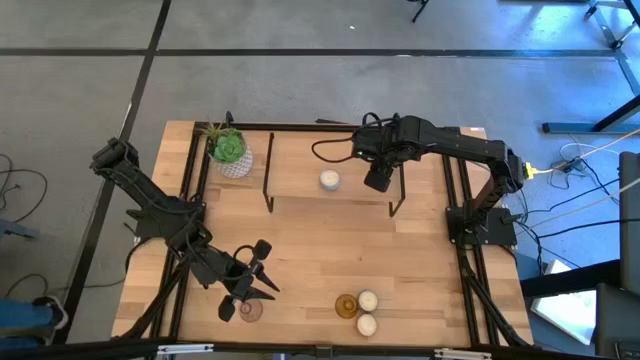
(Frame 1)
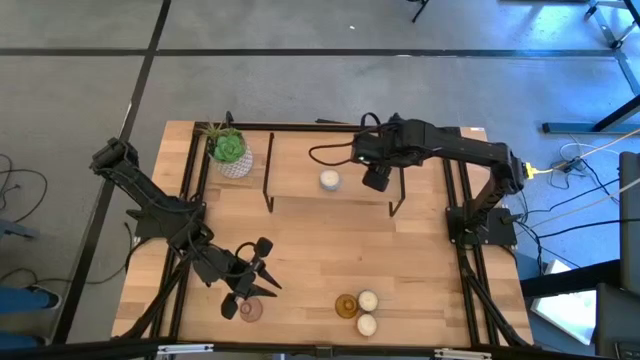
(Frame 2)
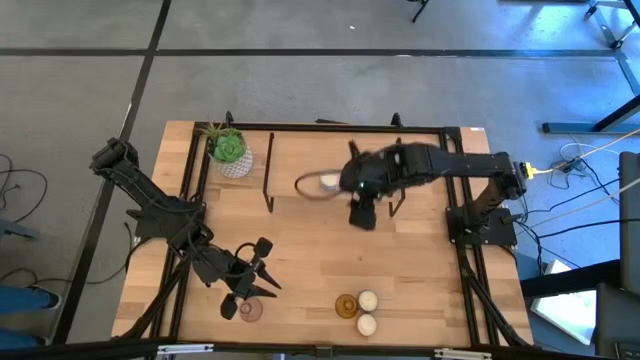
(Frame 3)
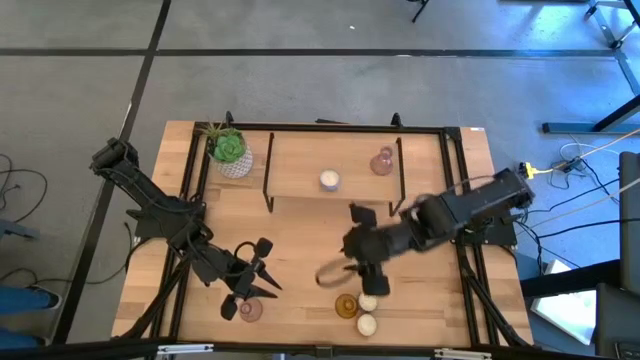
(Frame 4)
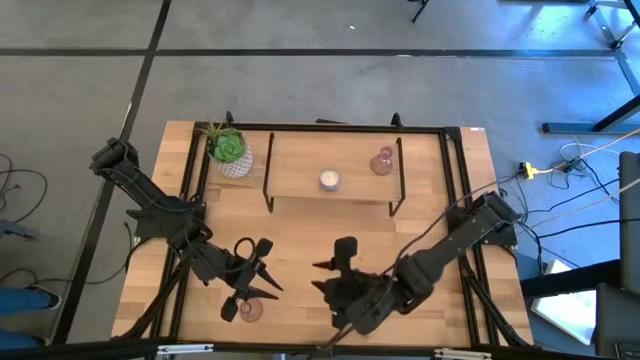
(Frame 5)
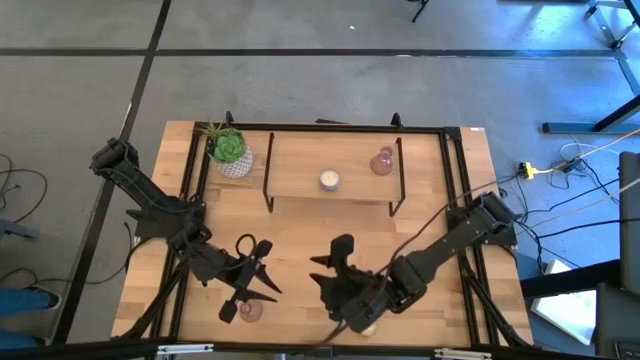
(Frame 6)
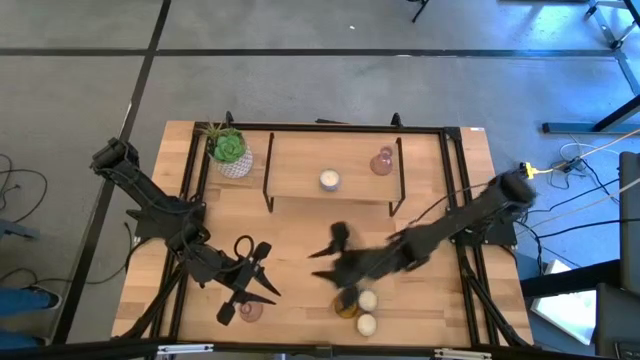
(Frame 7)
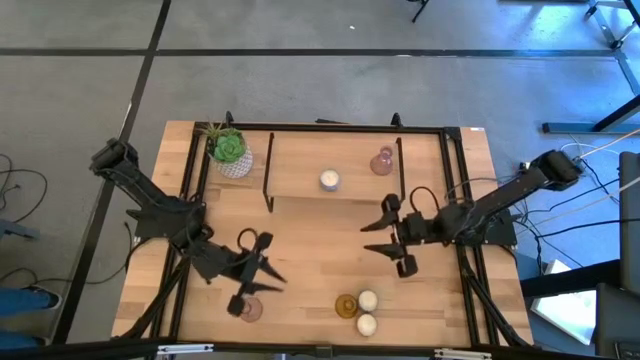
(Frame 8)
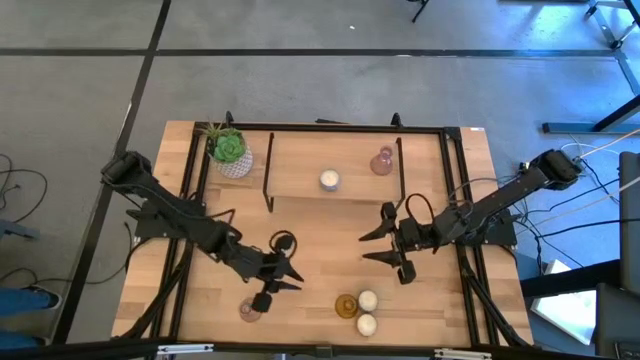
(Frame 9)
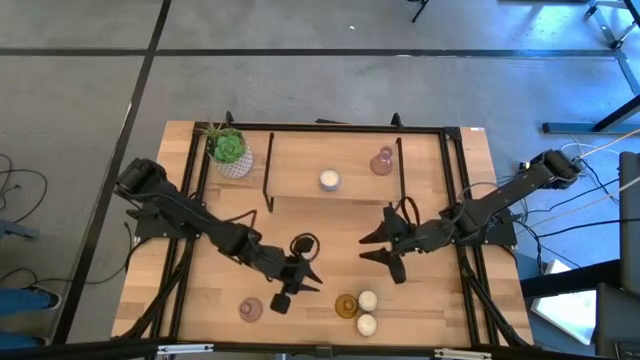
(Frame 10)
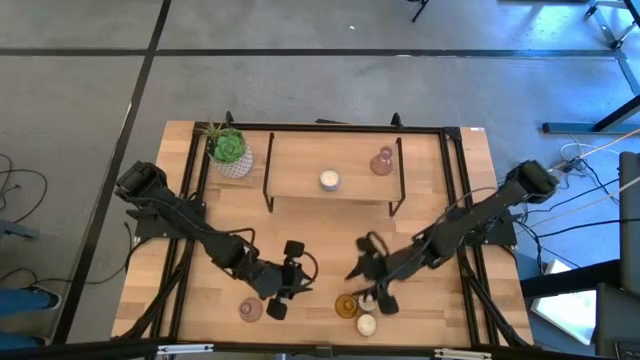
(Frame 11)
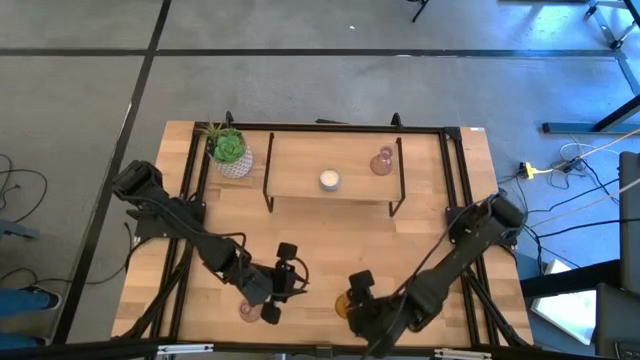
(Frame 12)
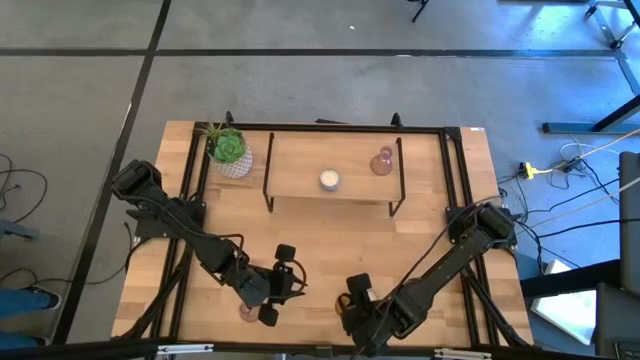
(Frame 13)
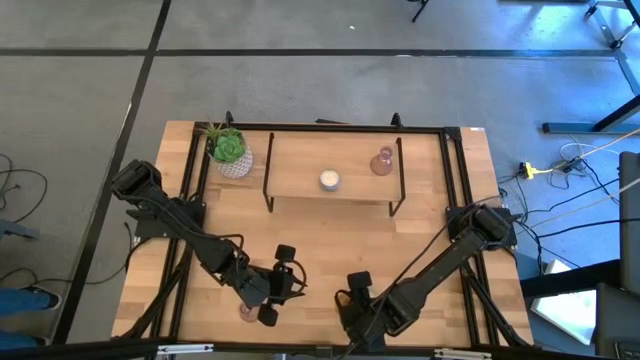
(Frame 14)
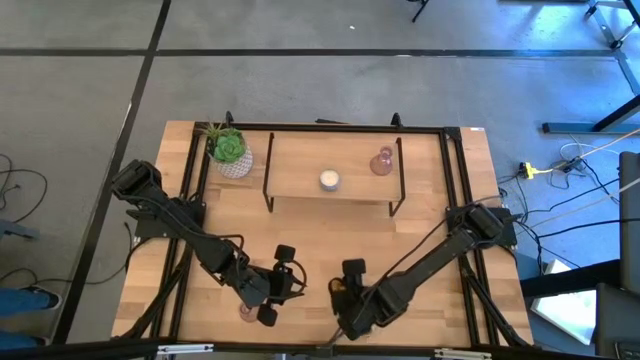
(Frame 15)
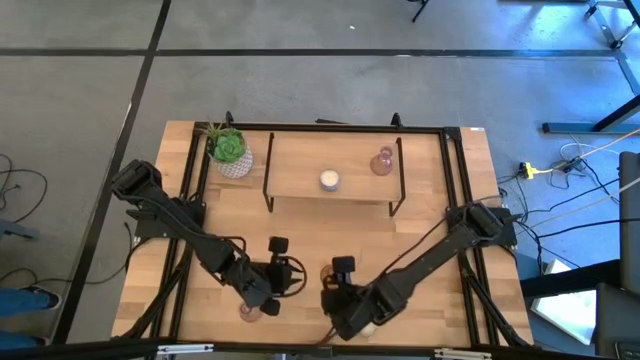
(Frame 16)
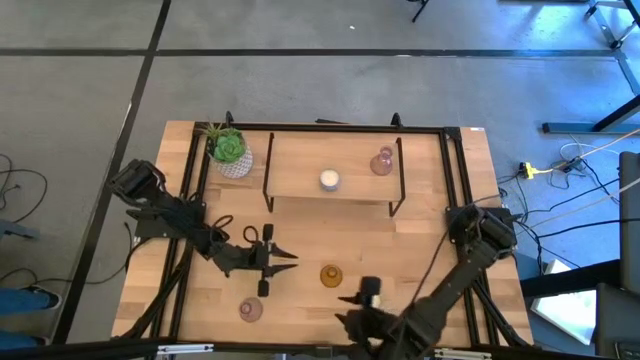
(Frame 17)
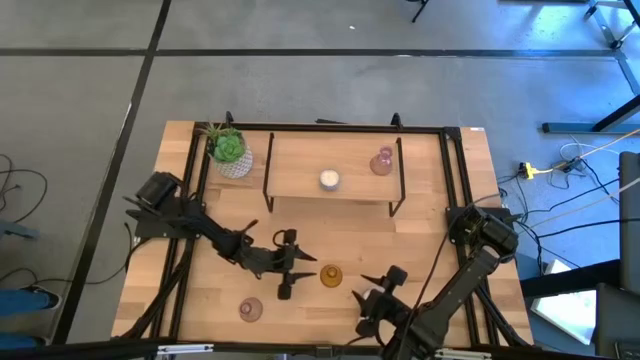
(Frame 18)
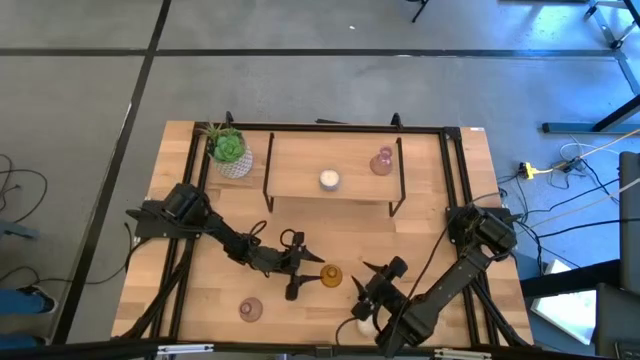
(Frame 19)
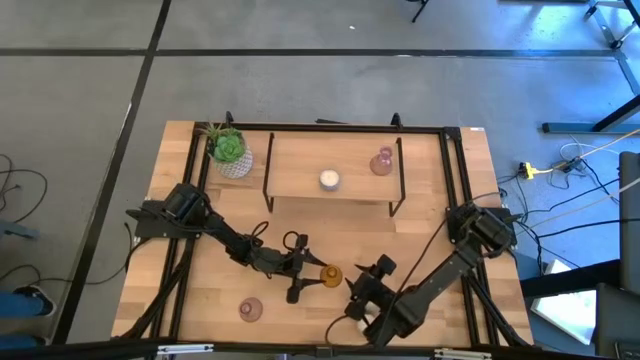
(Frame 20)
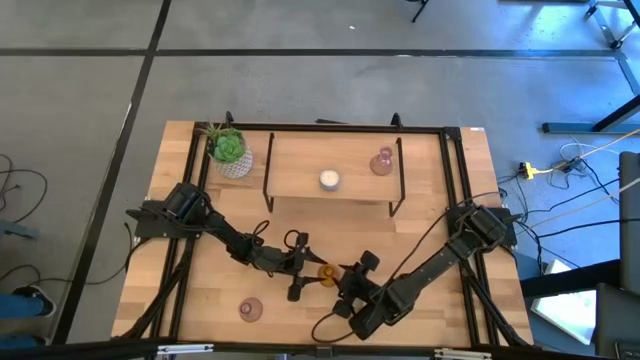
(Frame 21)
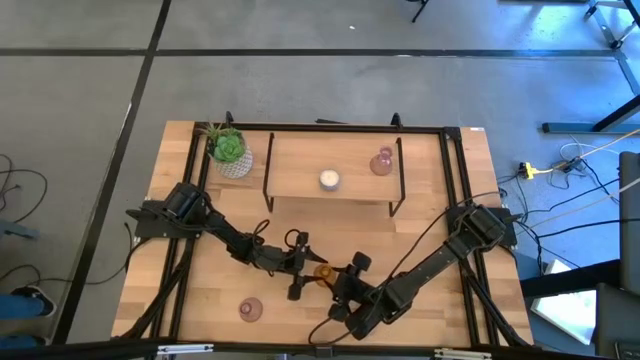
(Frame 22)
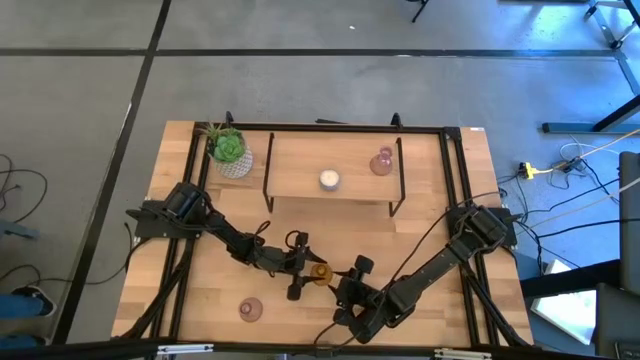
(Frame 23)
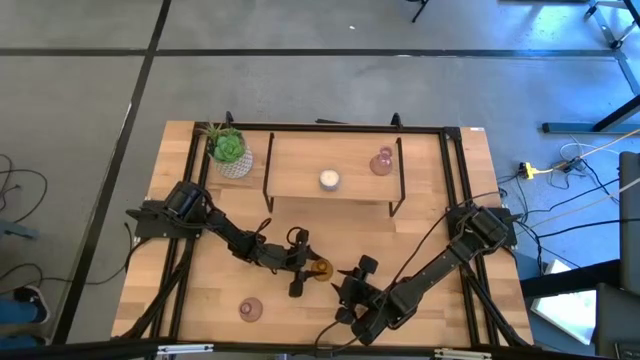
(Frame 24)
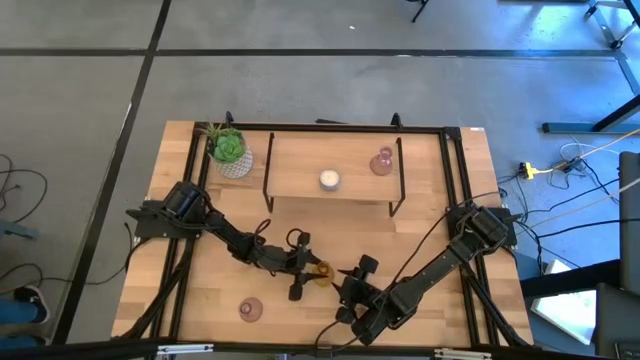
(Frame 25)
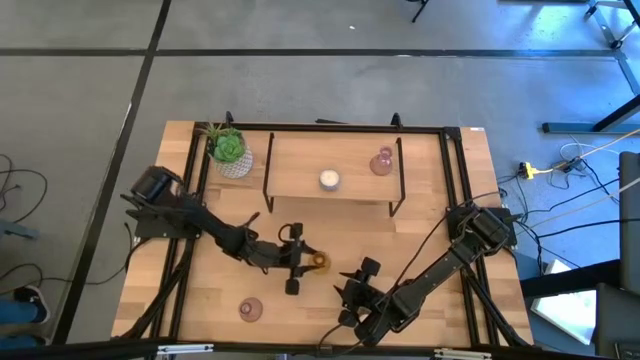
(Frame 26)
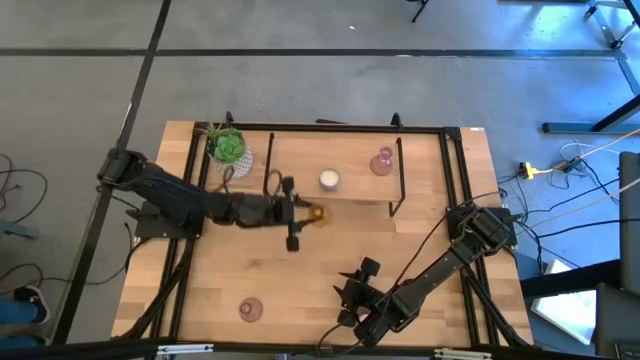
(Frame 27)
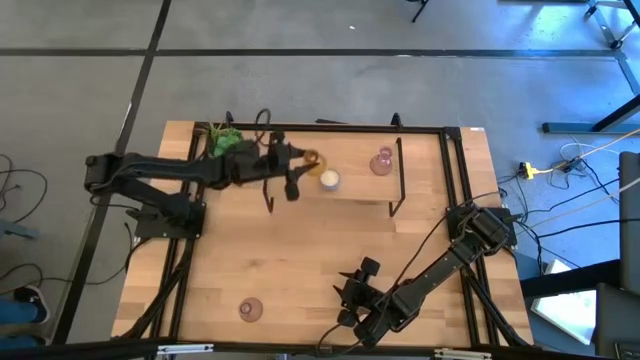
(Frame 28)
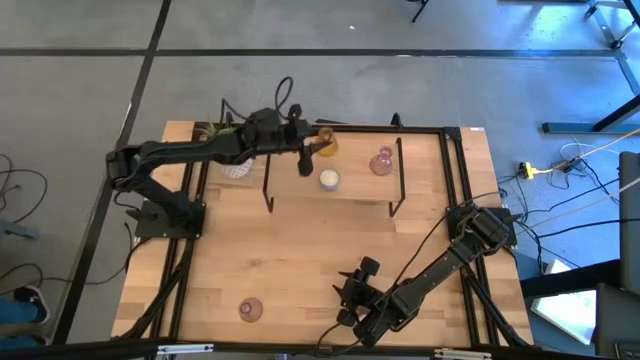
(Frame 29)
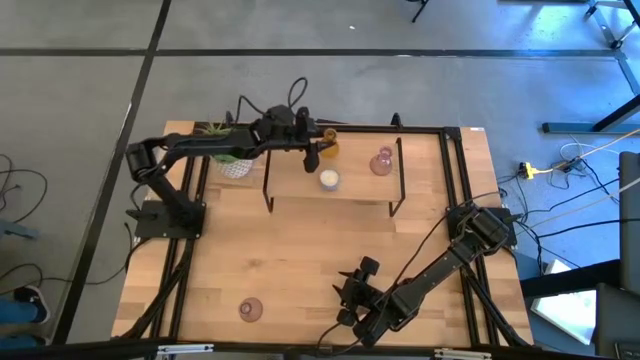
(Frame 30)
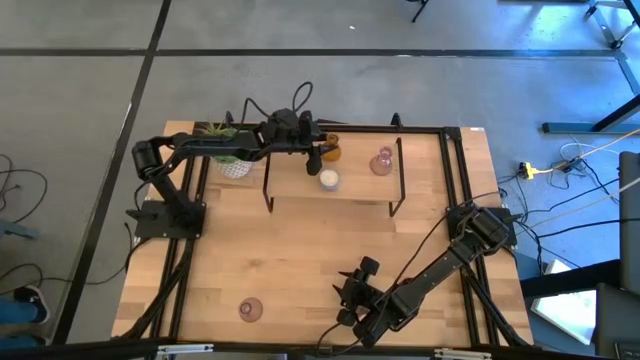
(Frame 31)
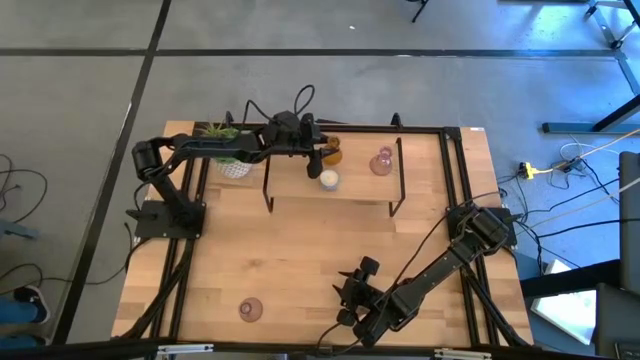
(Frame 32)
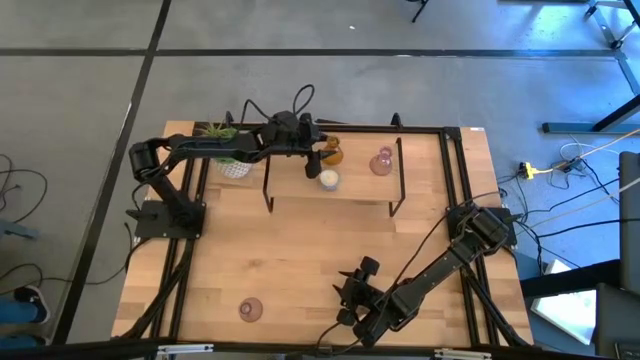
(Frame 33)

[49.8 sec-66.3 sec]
Task: Pick & Place candle stick holders
Put the yellow candle holder on the shelf aligned with the pink candle holder

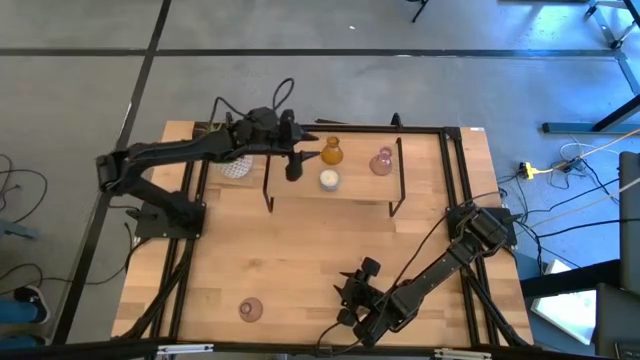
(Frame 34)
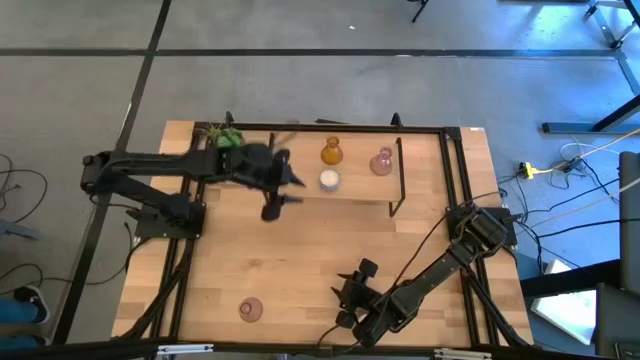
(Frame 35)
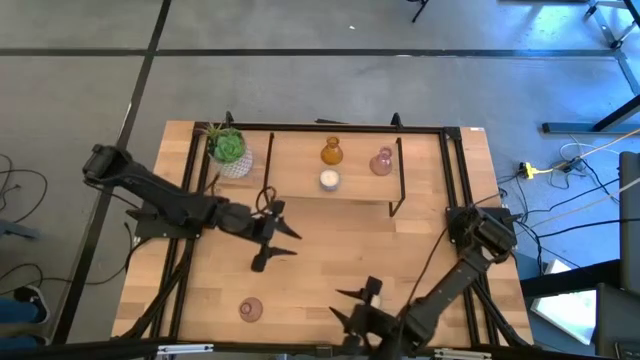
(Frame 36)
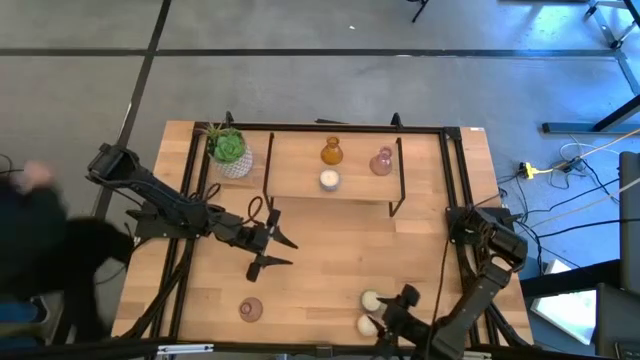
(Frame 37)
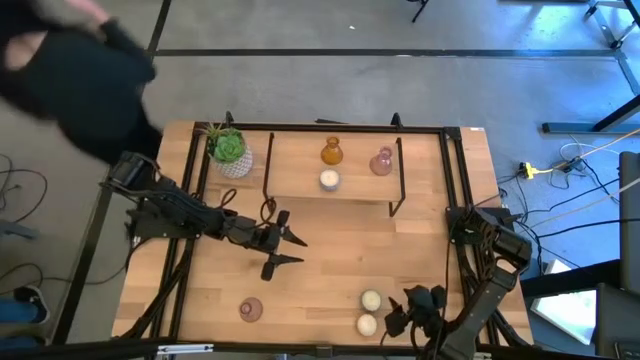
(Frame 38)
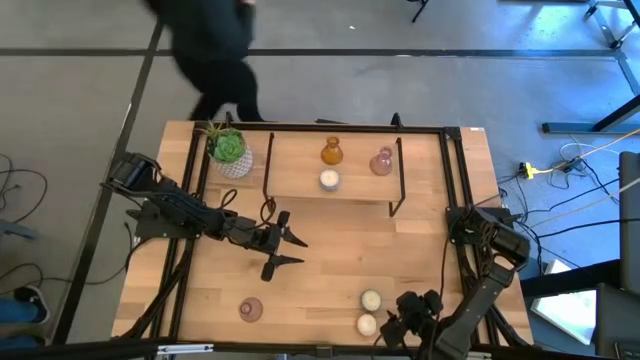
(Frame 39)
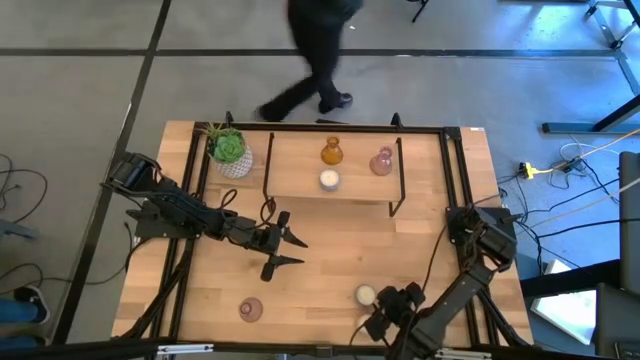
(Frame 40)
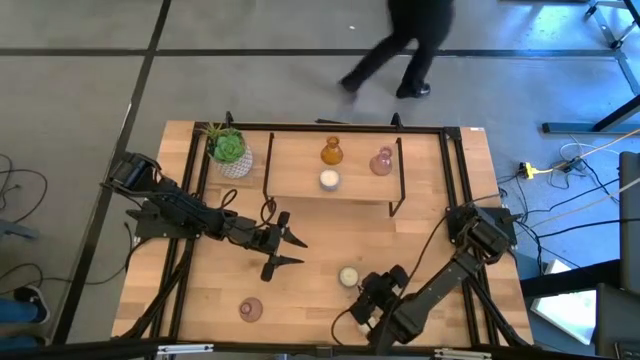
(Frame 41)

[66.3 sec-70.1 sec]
Move the blue scented candle to the center of the table
